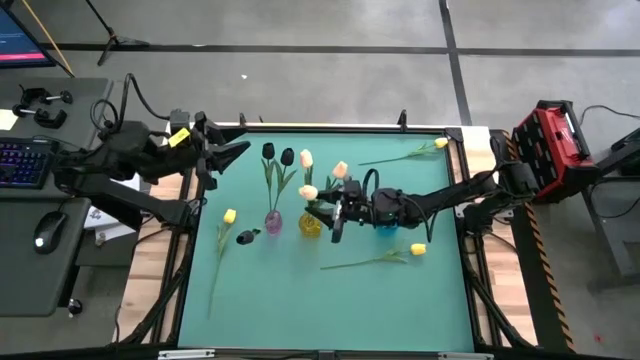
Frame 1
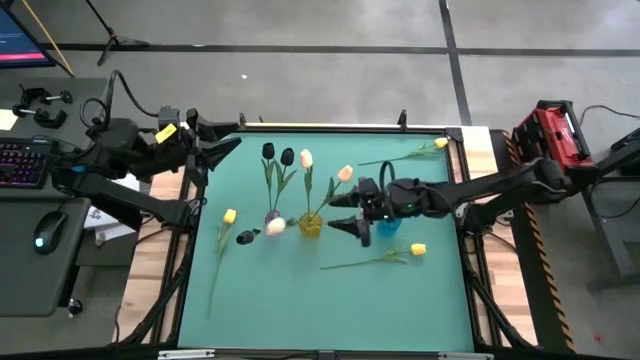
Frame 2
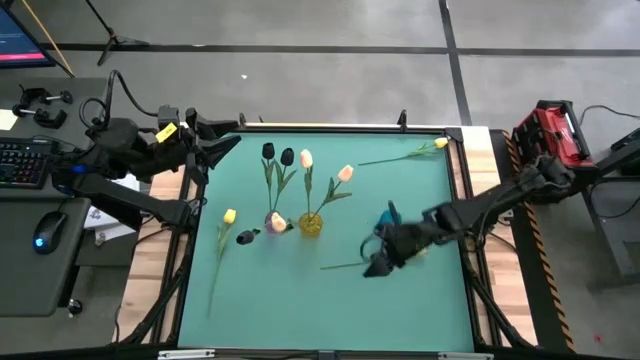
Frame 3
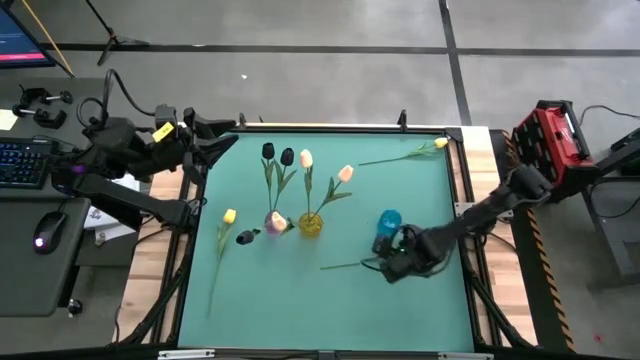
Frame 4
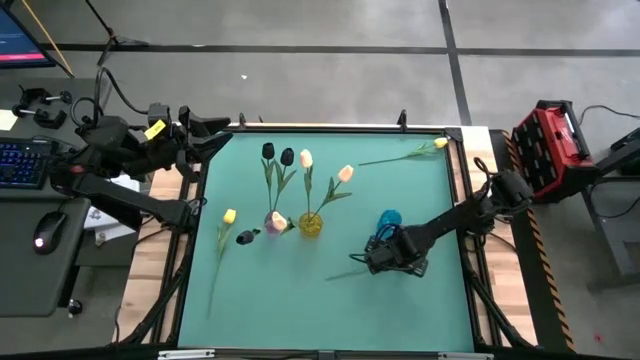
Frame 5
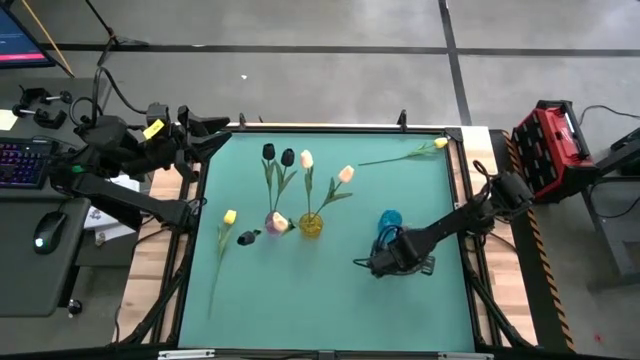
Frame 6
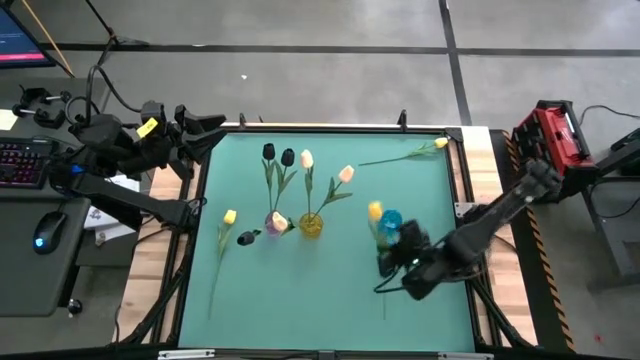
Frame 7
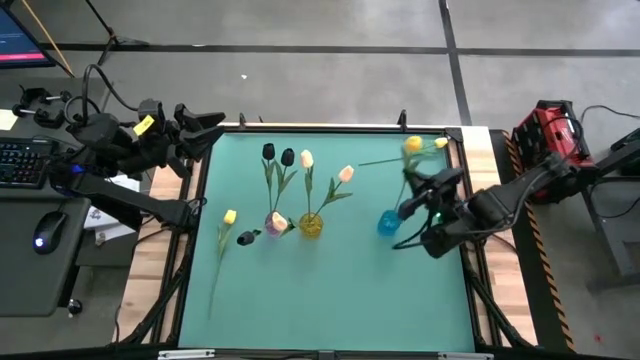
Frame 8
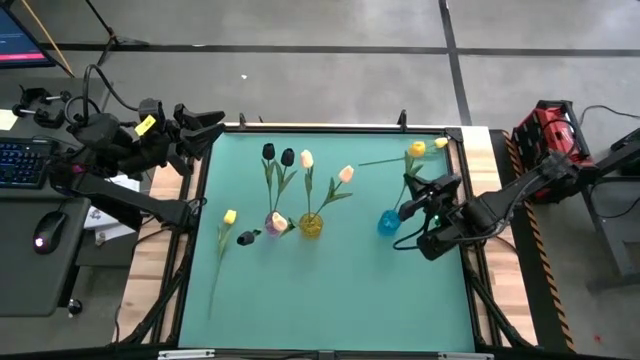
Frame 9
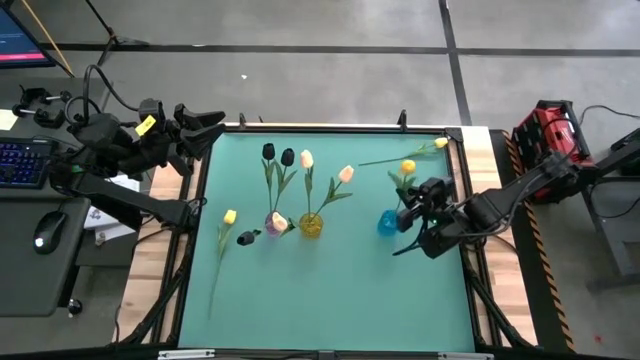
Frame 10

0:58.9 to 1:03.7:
Task: Sort flowers into vase by color
Put the bottom right yellow tulip into the blue vase

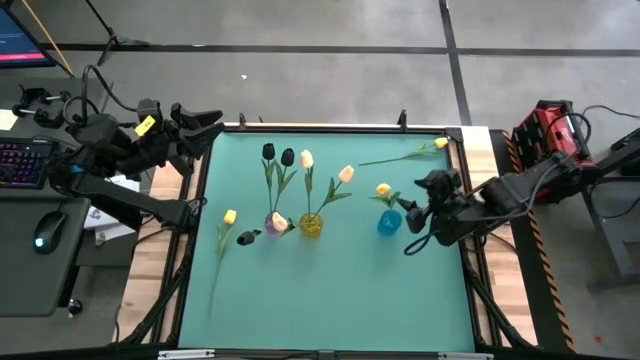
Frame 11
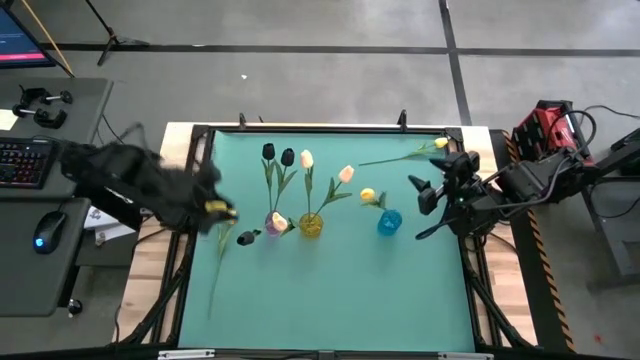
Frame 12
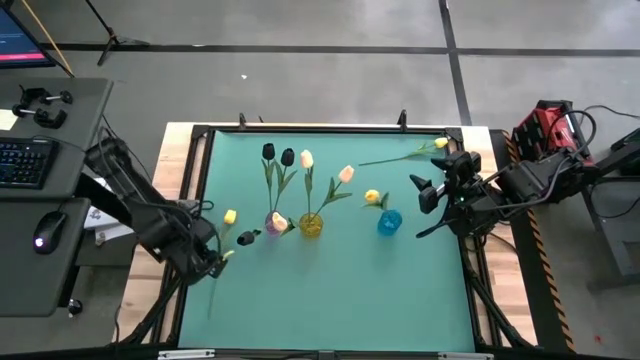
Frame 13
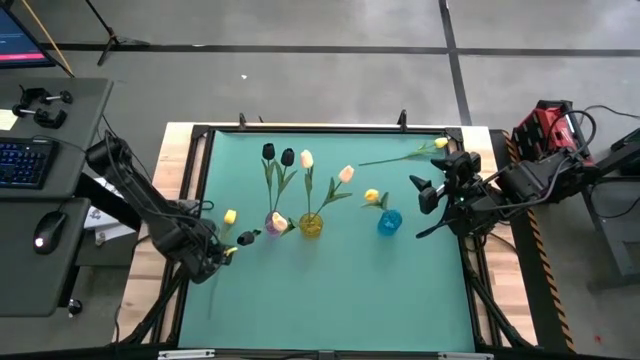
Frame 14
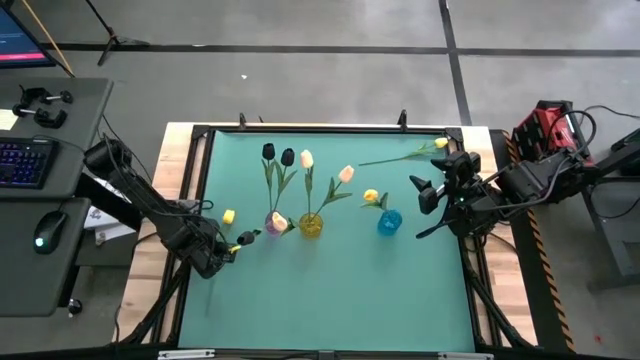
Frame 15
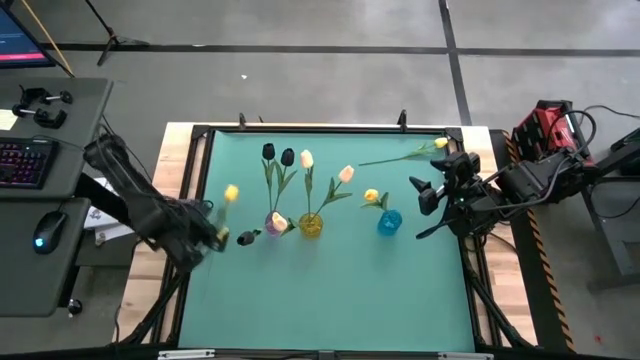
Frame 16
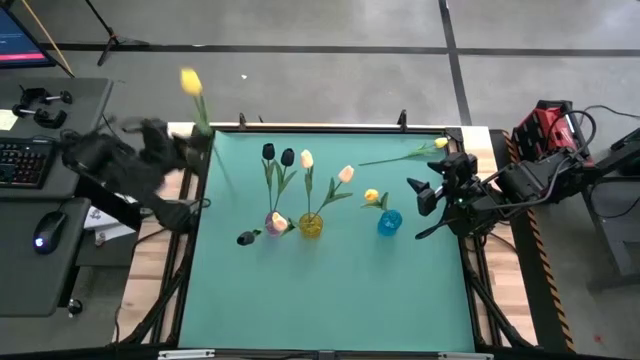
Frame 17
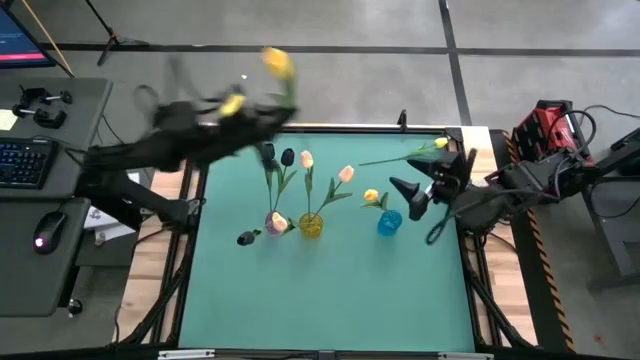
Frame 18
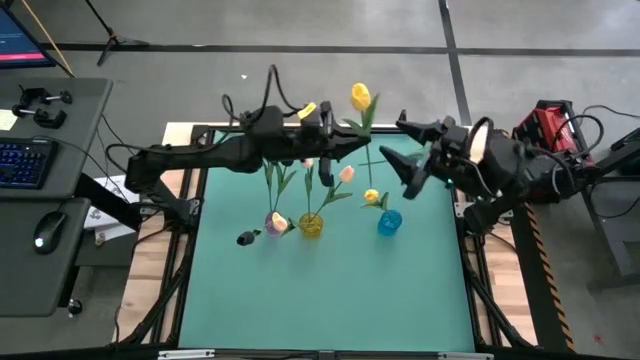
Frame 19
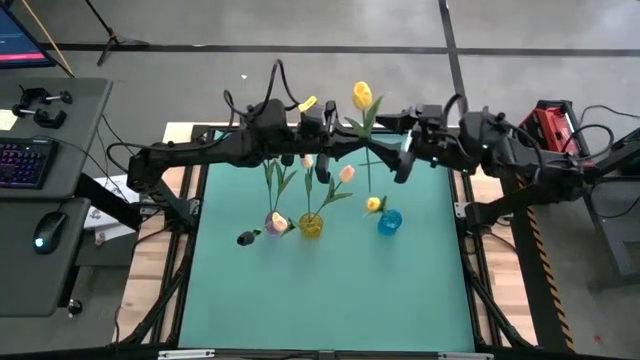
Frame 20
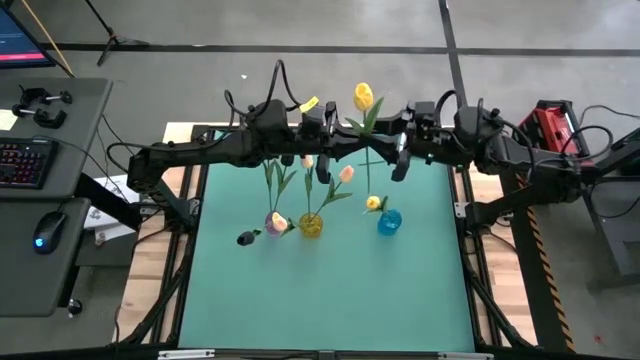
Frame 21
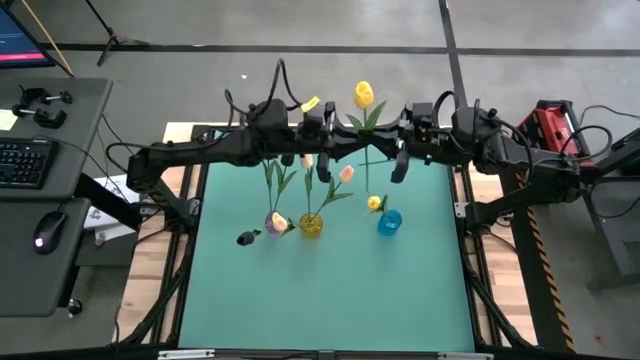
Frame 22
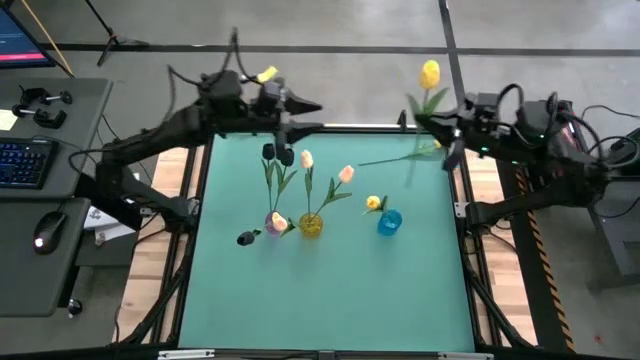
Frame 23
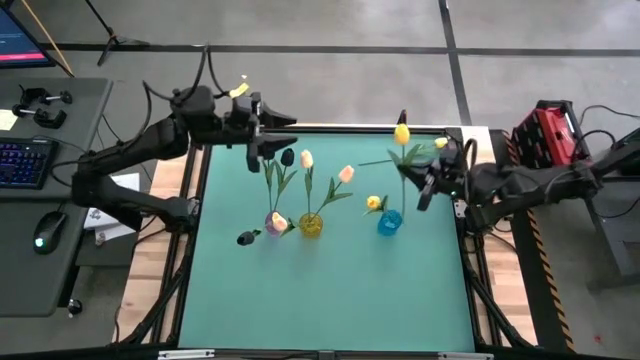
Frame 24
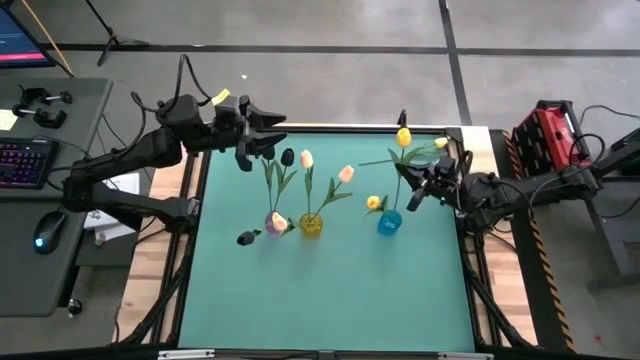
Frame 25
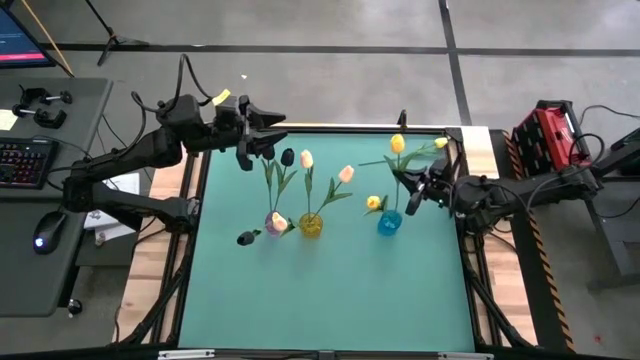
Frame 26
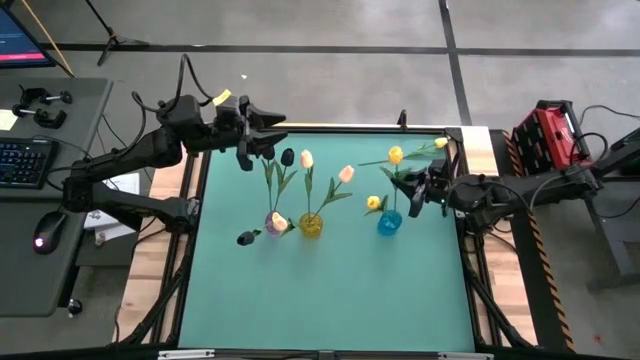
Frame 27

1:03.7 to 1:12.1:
Put the left yellow tulip into the blue vase

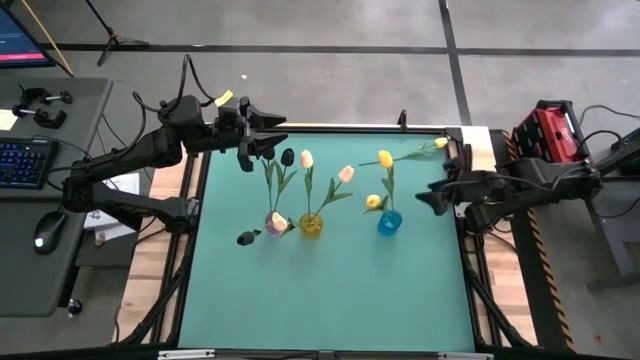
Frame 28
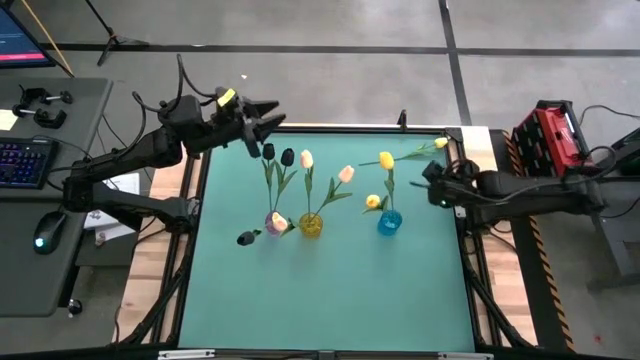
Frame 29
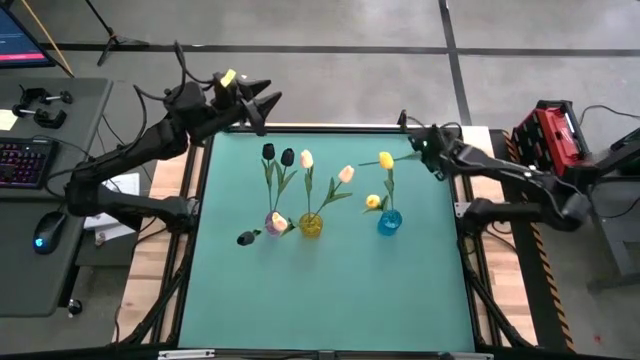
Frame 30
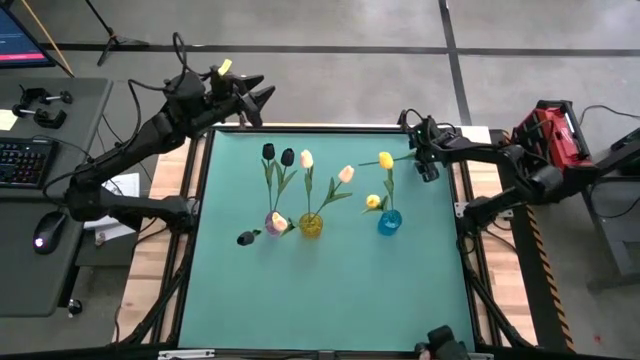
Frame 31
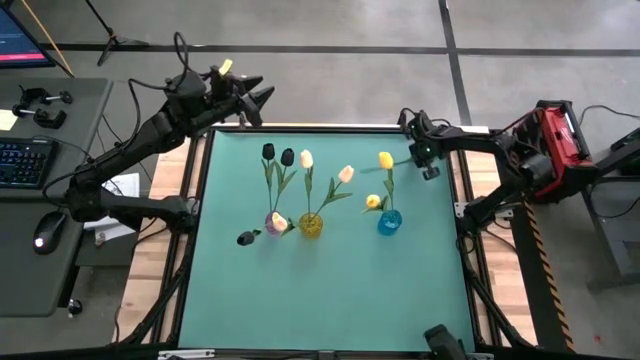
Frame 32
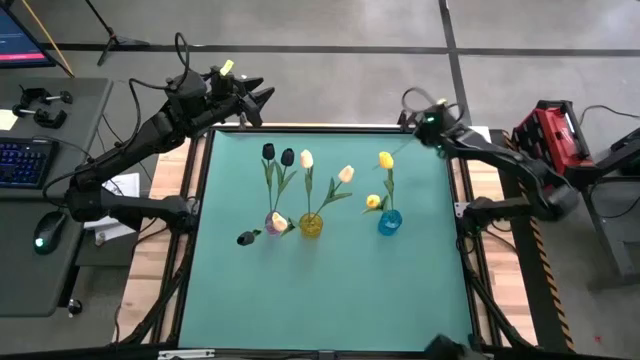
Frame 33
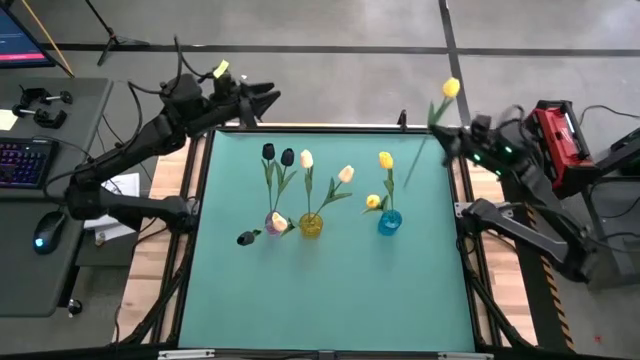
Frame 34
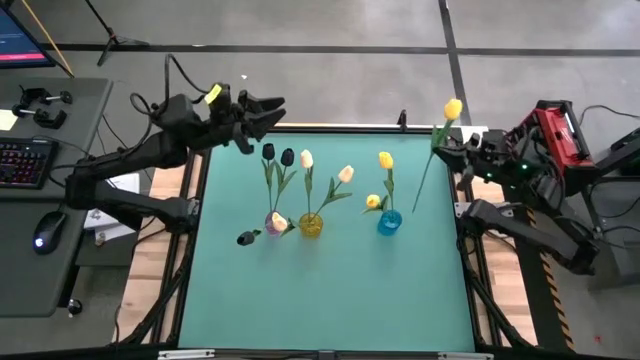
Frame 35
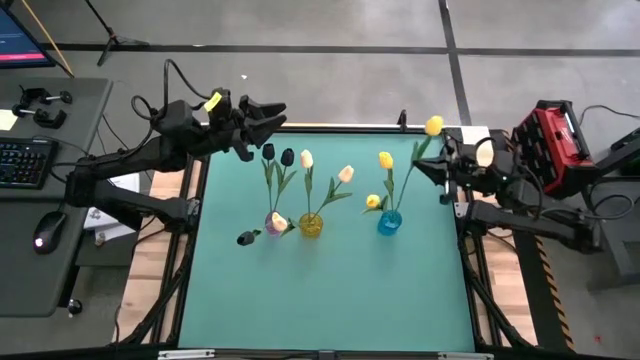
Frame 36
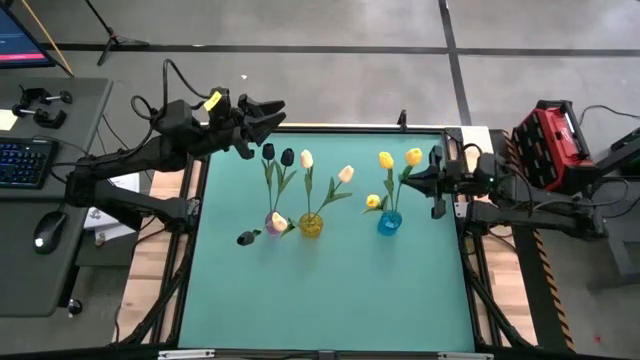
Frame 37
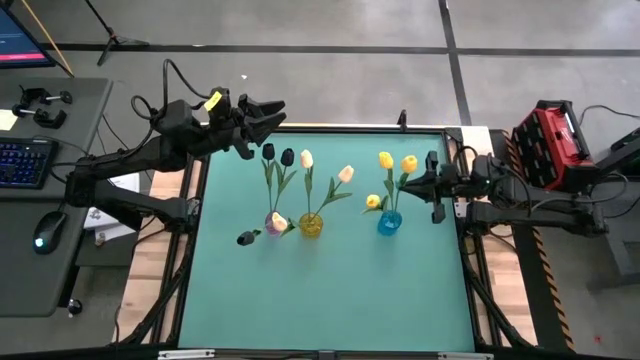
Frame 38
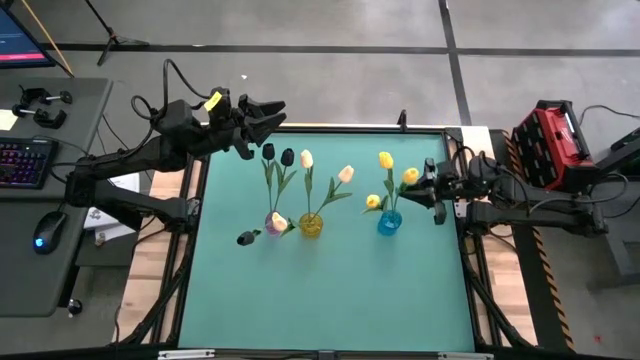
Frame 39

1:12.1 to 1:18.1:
Put the yellow tulip into the blue vase

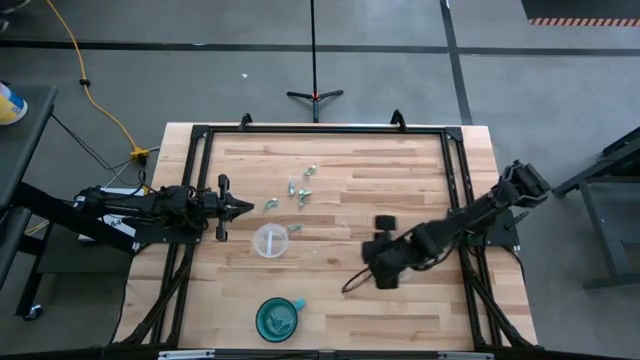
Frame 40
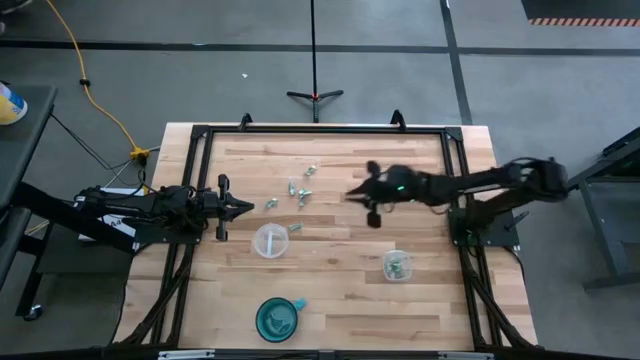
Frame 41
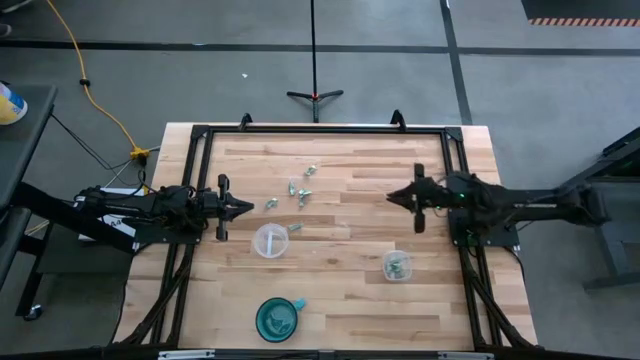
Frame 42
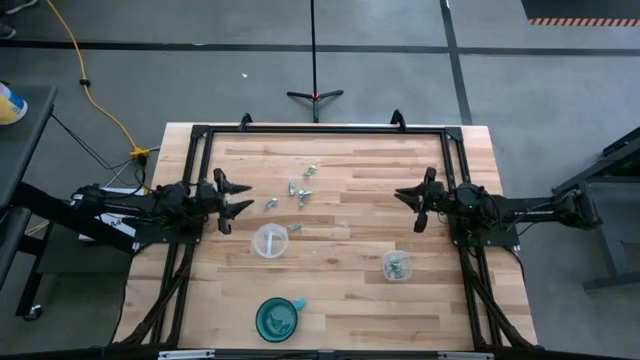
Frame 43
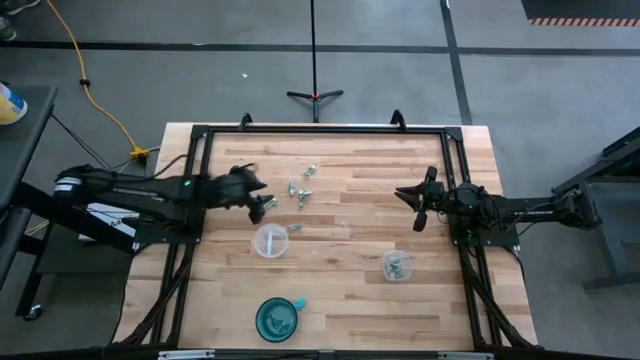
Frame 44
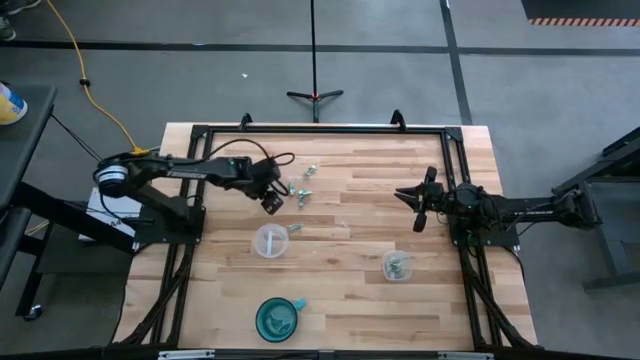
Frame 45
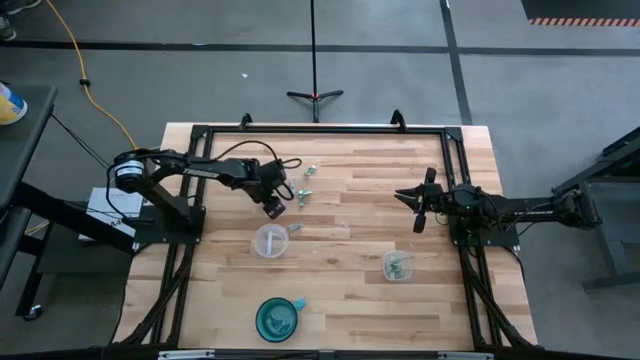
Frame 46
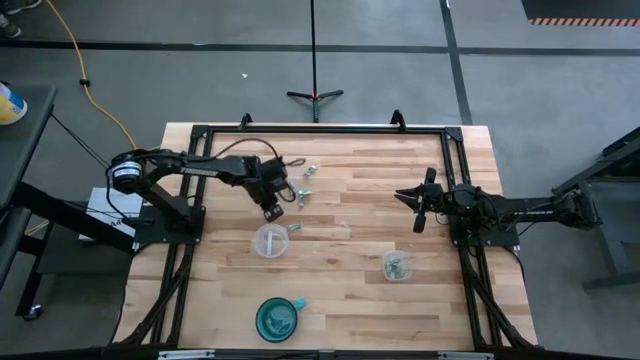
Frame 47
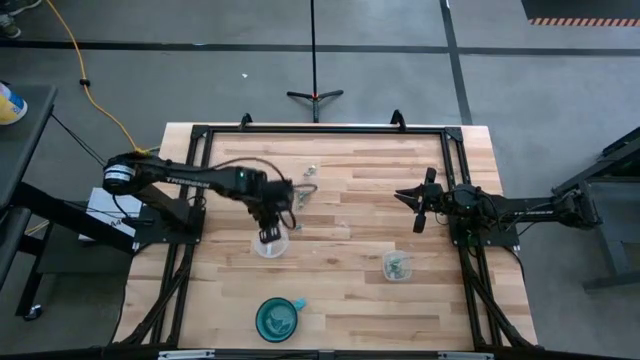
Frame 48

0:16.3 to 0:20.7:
Task: Sort candy
Put the green candy into the circle transparent bin
